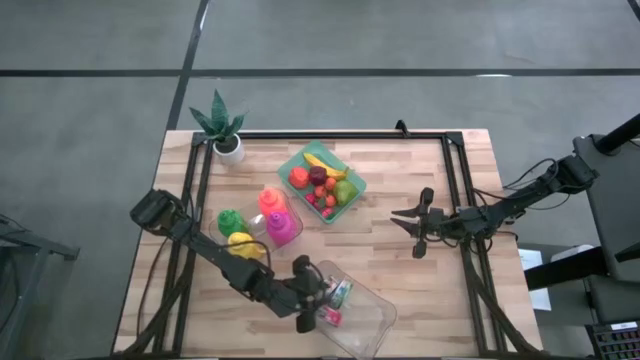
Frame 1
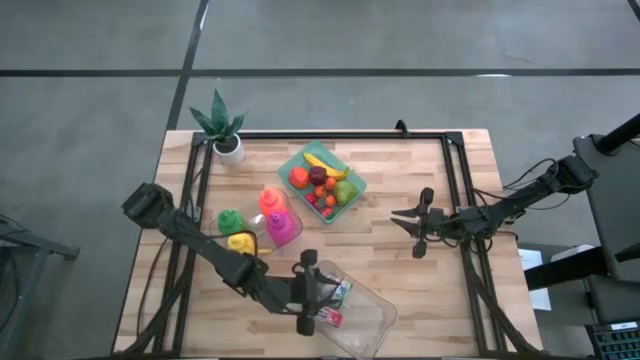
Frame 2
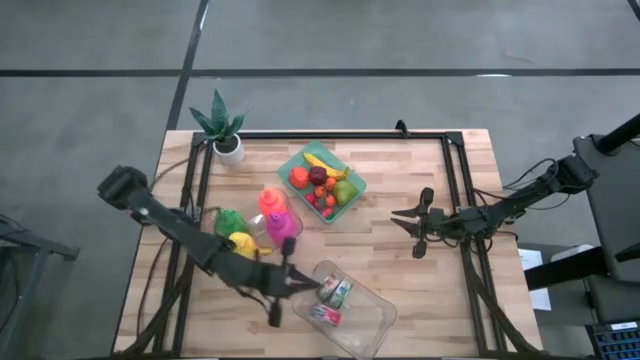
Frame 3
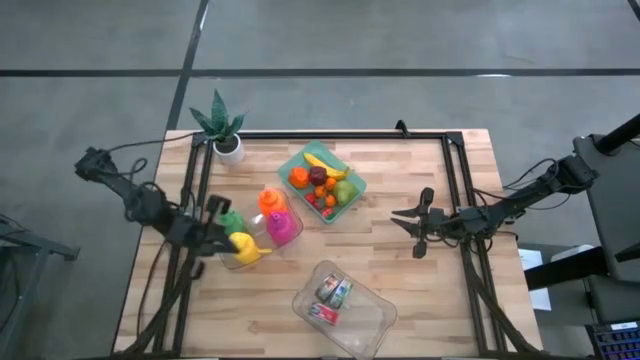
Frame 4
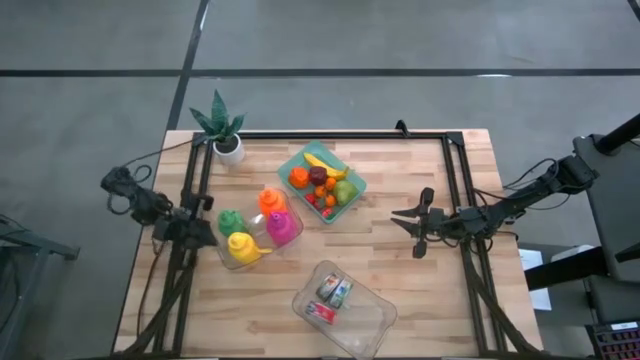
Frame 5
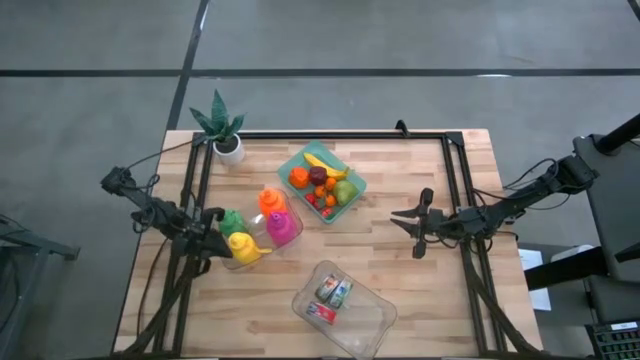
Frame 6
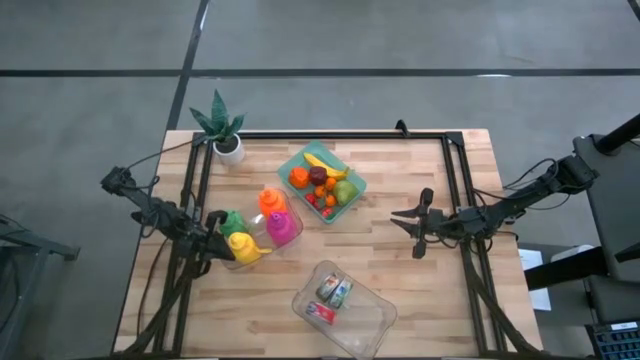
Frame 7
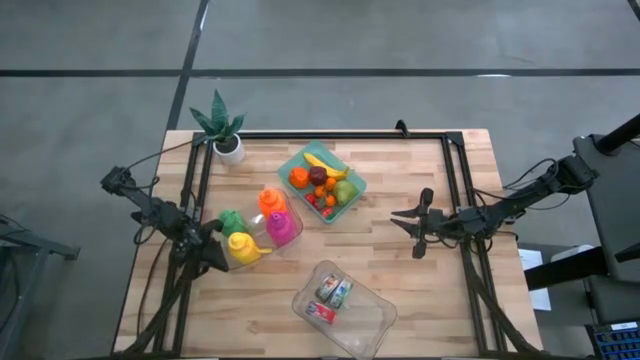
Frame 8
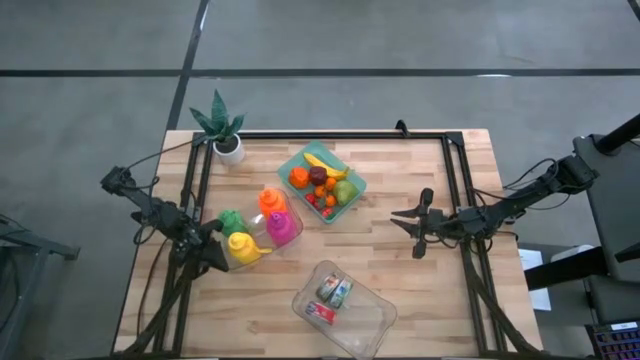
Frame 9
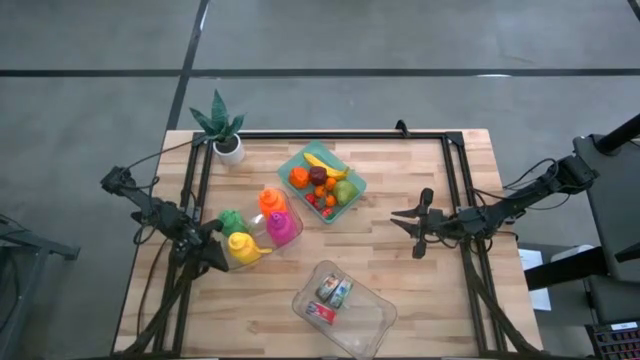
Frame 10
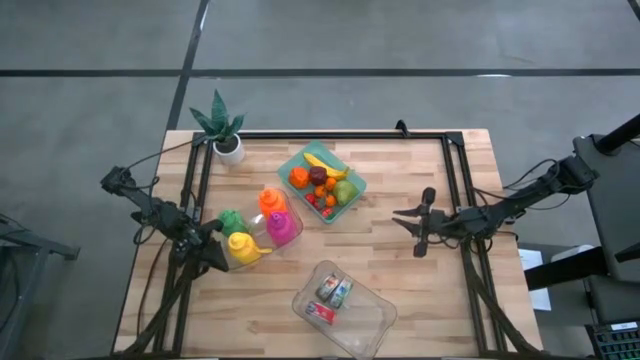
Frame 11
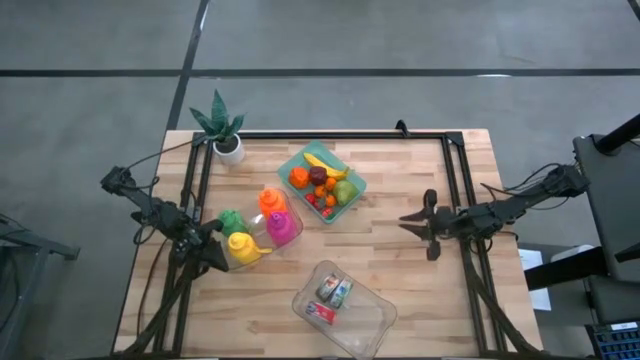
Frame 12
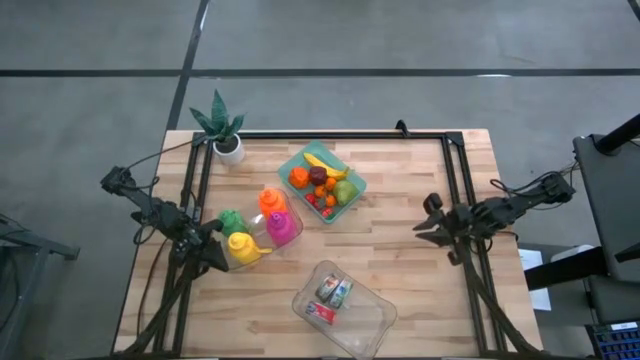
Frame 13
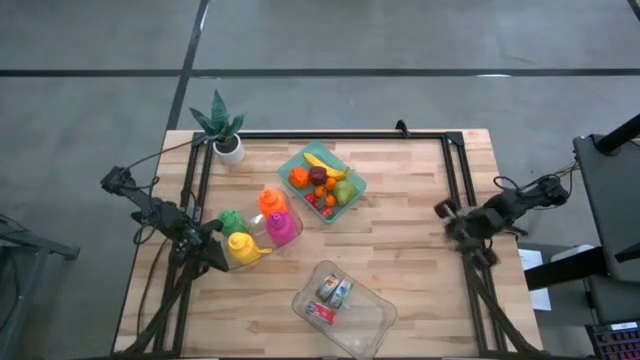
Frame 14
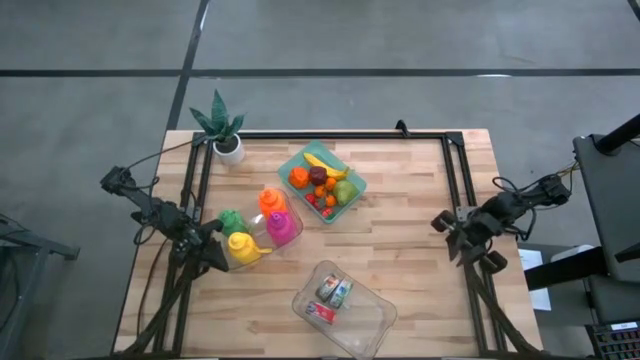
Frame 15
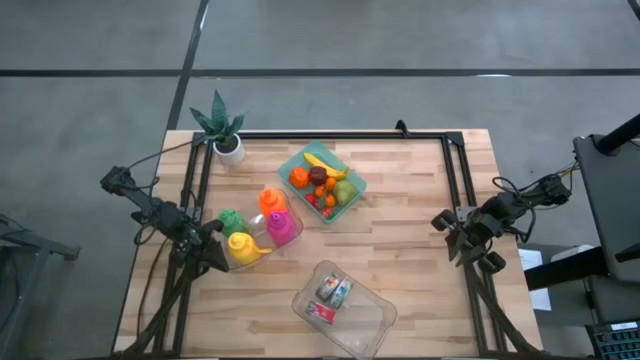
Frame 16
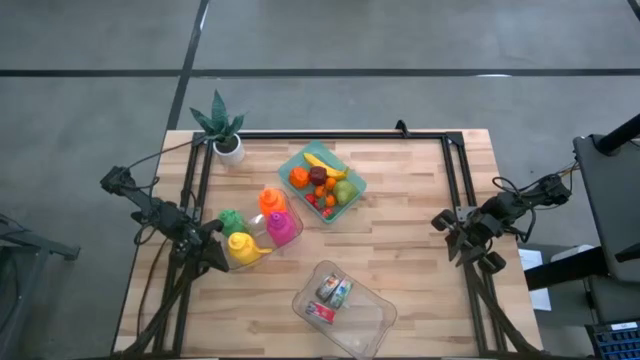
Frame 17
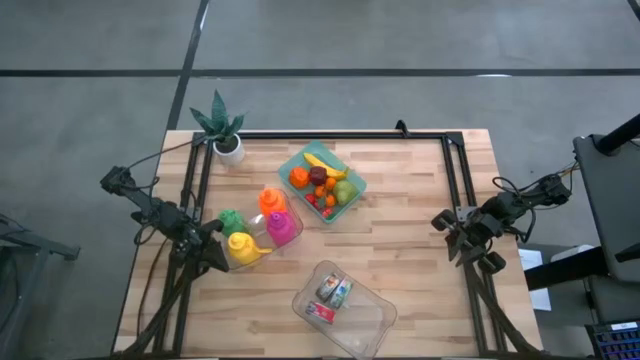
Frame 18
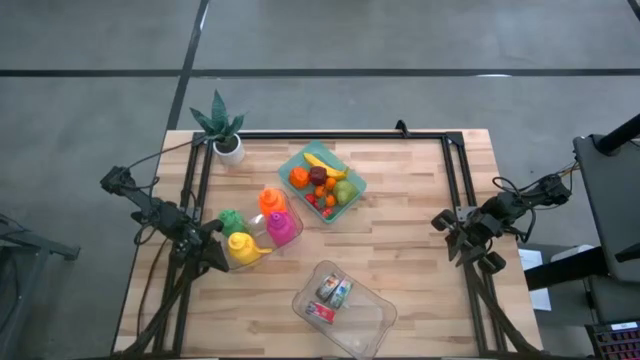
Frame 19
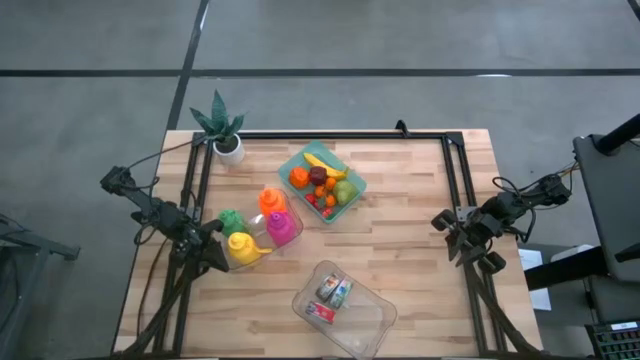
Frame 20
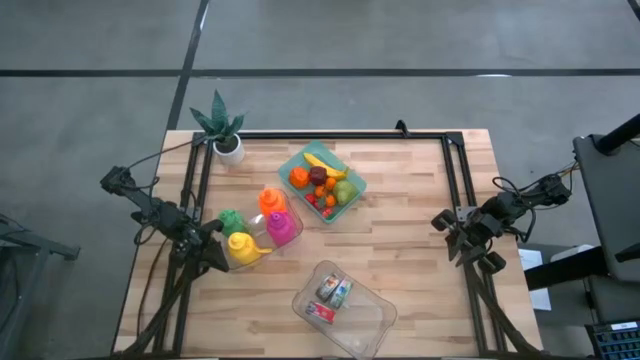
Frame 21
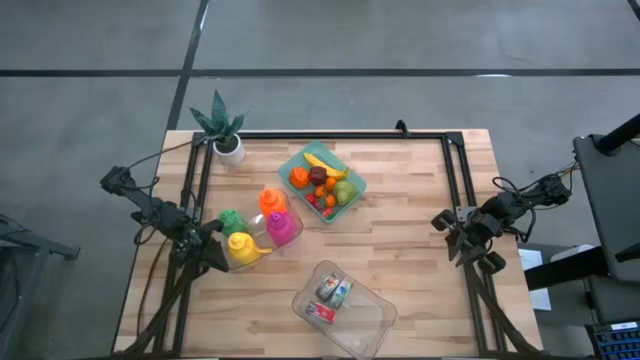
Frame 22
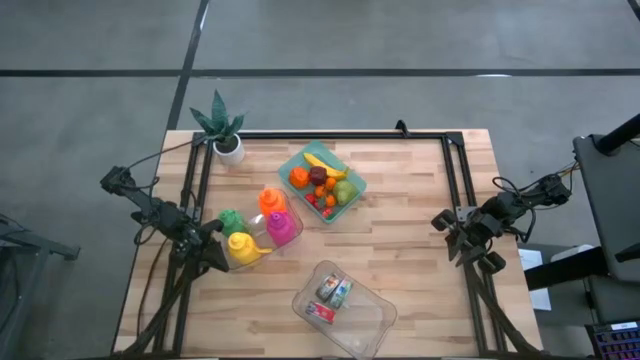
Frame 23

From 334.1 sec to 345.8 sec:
Task: Pick & Place Food Item
Return to Home Position

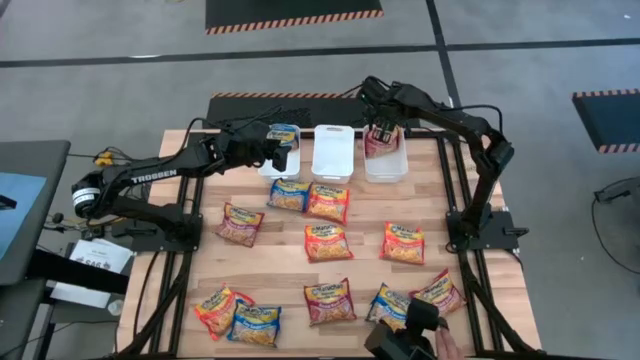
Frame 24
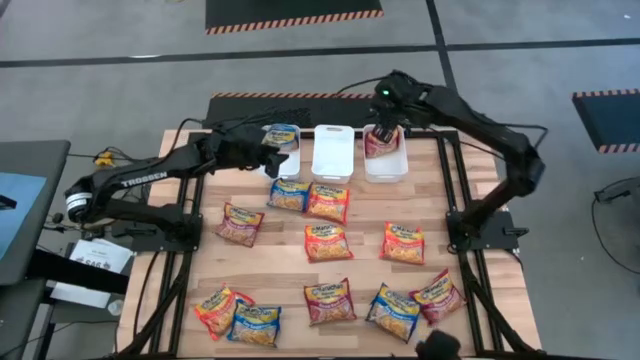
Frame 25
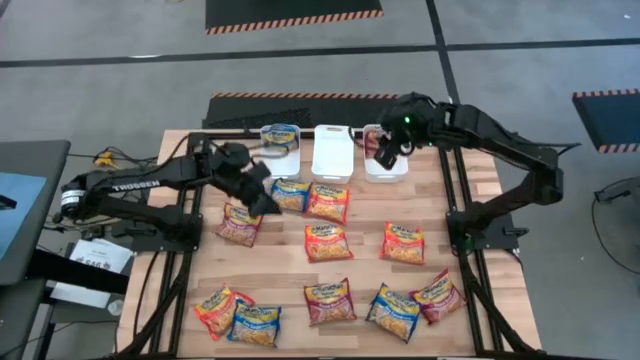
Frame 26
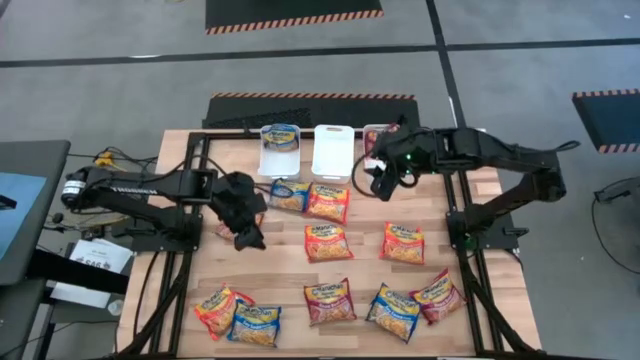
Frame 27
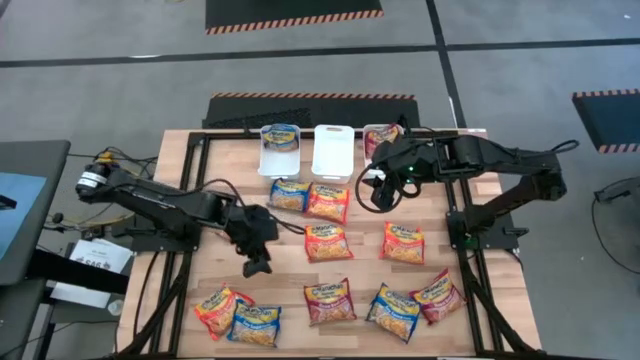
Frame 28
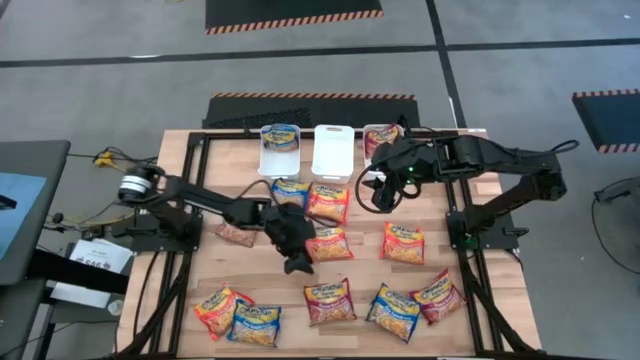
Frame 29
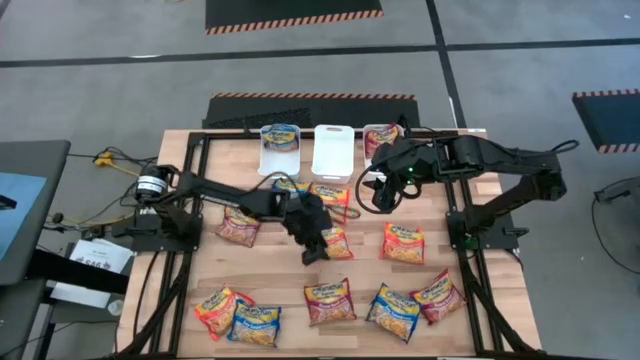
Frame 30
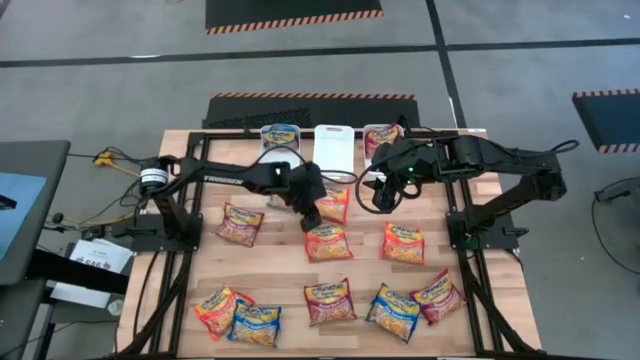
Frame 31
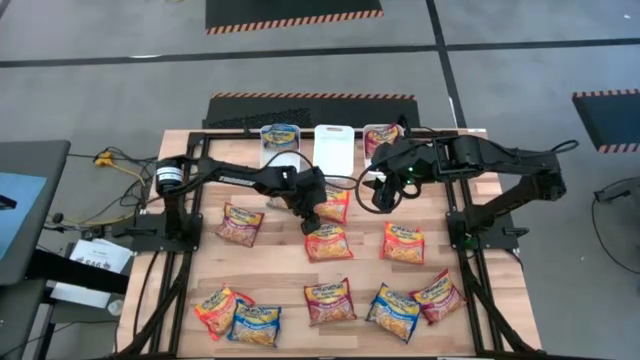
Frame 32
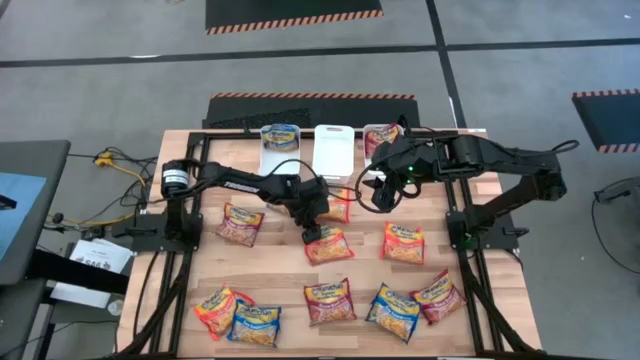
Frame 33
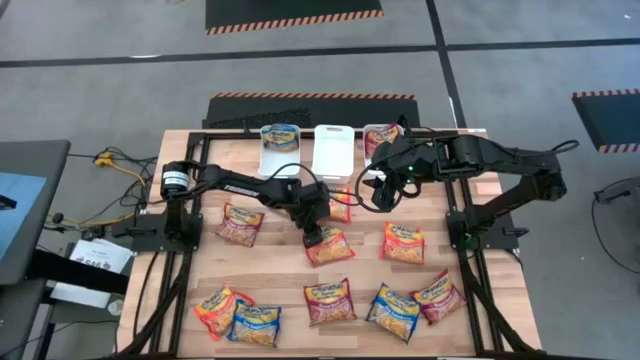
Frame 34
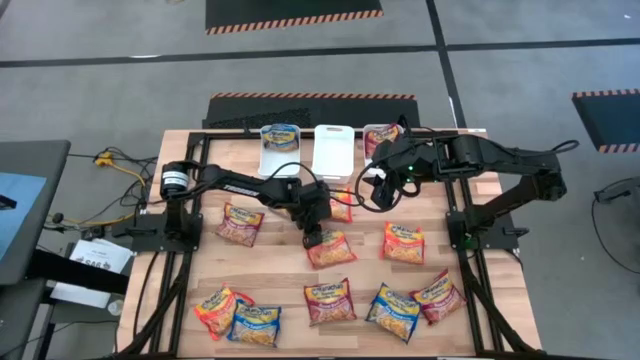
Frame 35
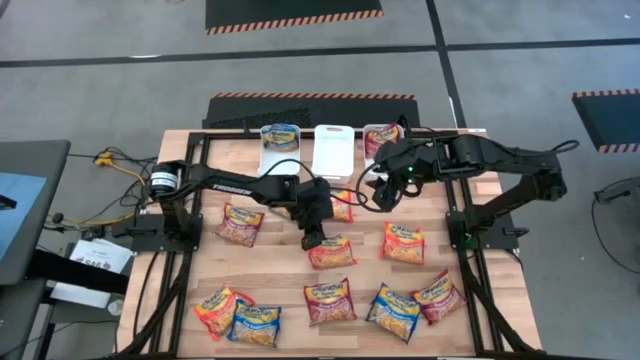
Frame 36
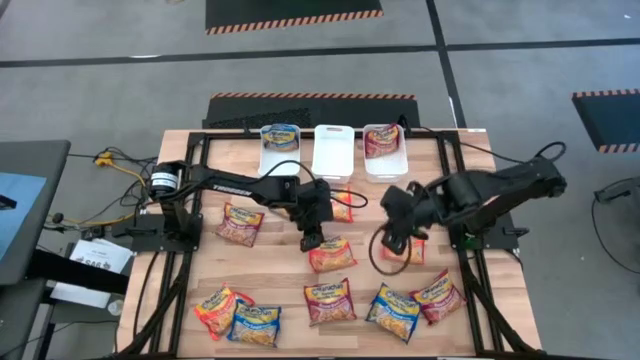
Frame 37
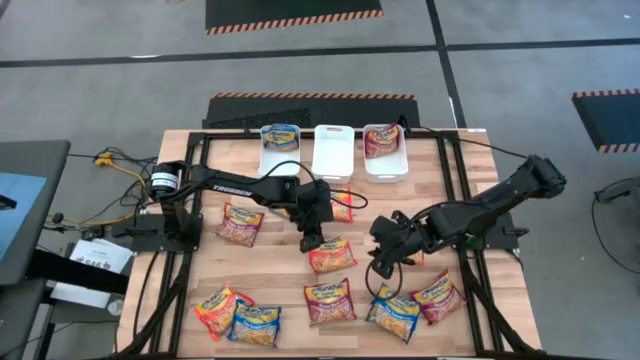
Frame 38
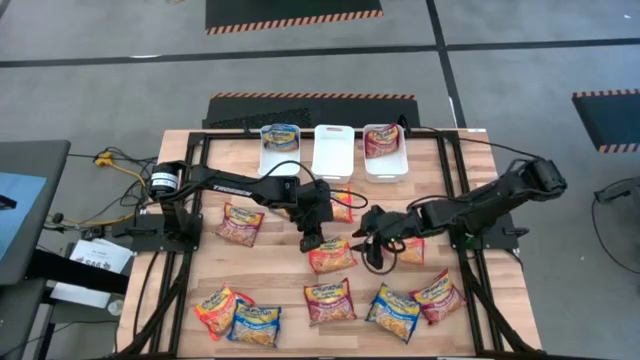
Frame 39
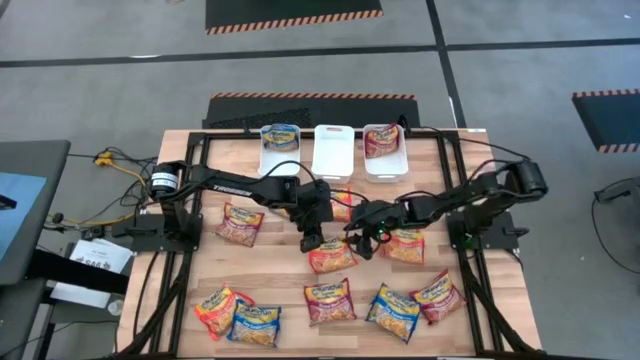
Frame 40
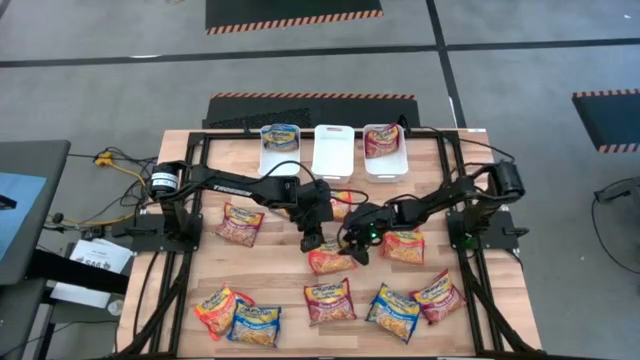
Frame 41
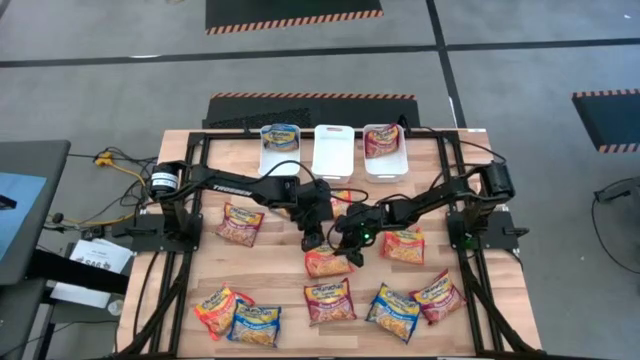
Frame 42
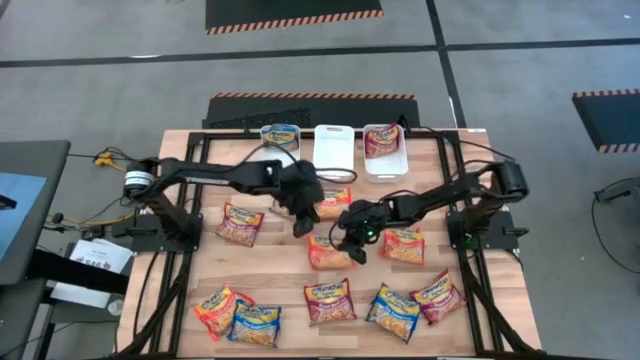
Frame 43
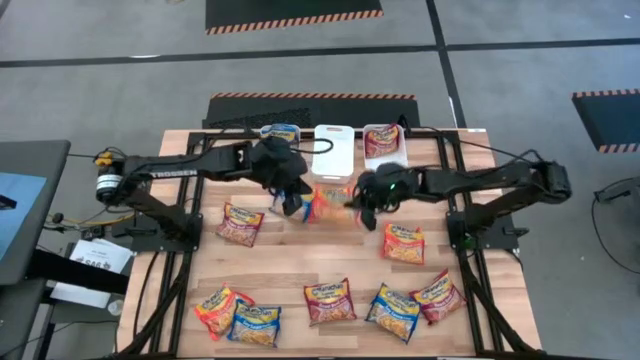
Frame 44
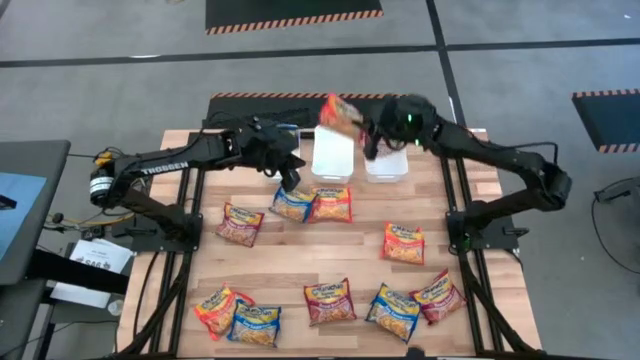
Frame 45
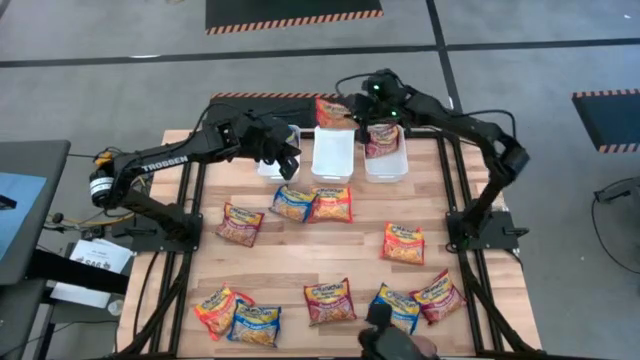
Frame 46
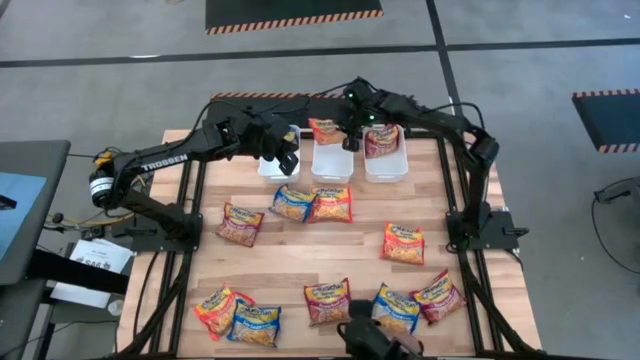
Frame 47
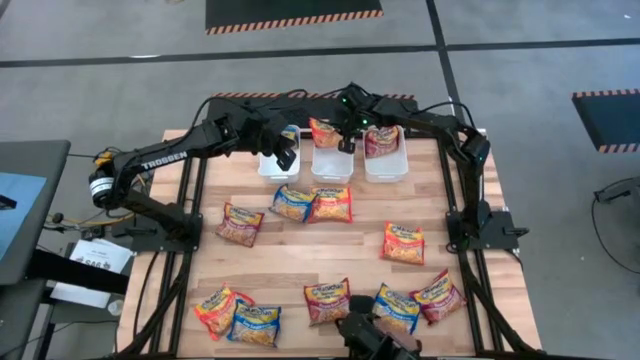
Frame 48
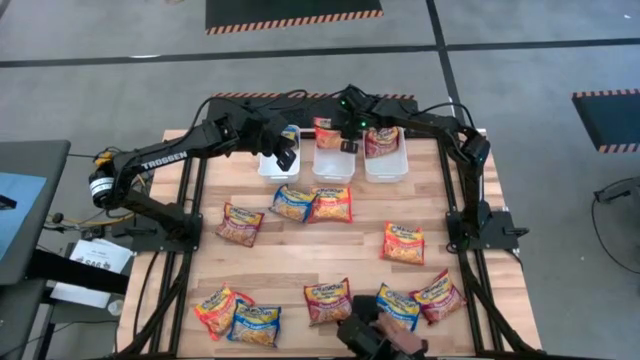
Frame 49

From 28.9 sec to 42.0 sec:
Task: Sort Maruchan noodles
Put the orange noodle pack into the center white bin
